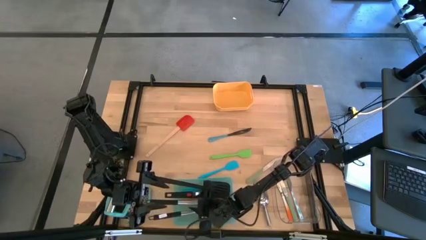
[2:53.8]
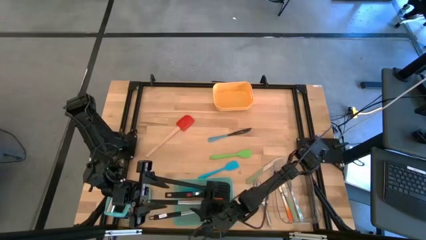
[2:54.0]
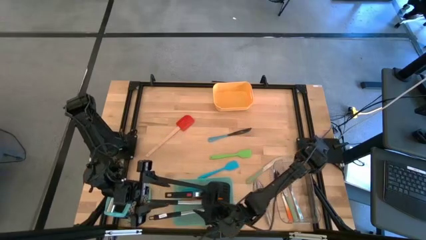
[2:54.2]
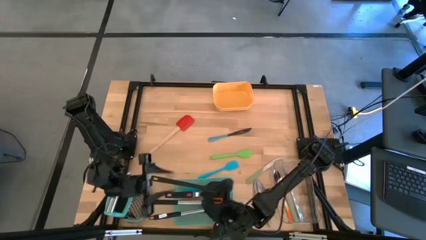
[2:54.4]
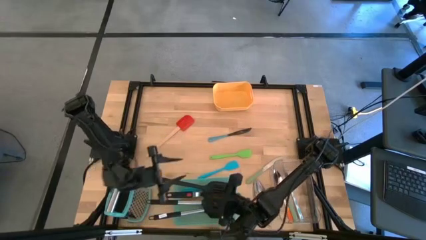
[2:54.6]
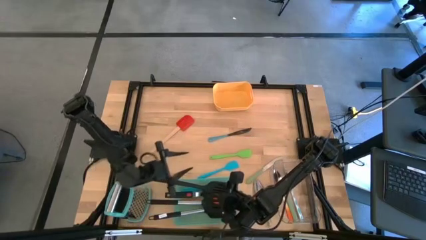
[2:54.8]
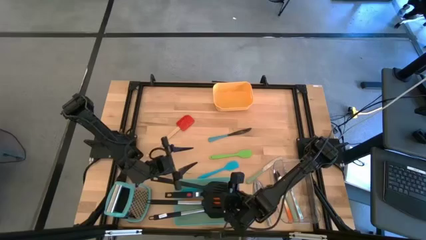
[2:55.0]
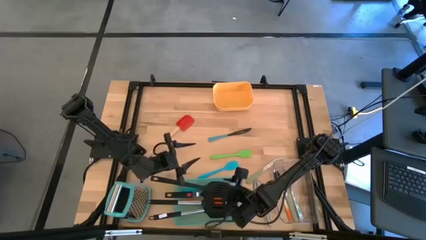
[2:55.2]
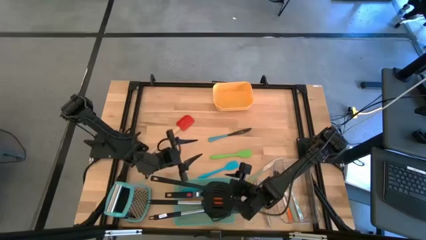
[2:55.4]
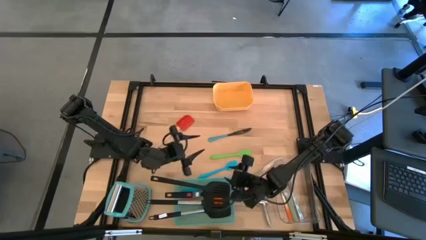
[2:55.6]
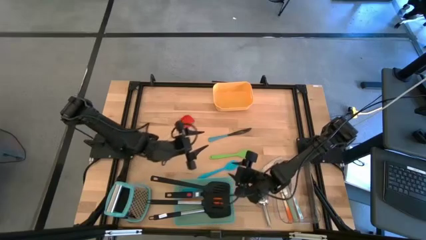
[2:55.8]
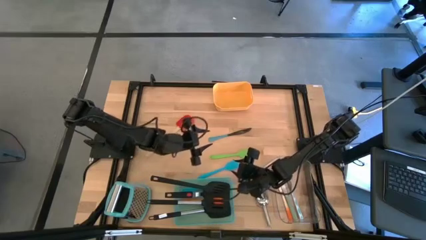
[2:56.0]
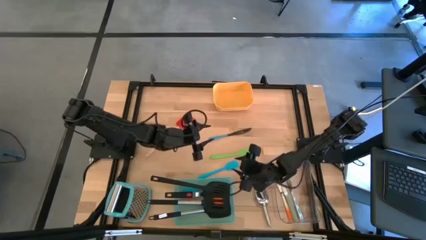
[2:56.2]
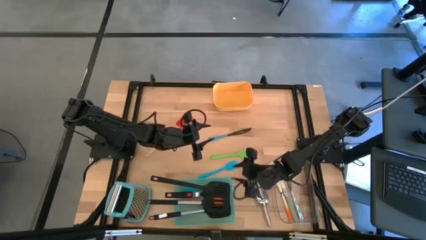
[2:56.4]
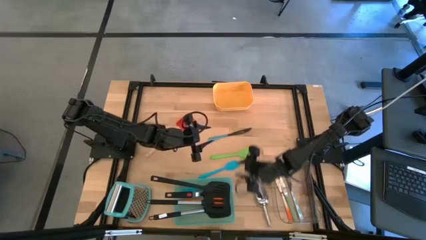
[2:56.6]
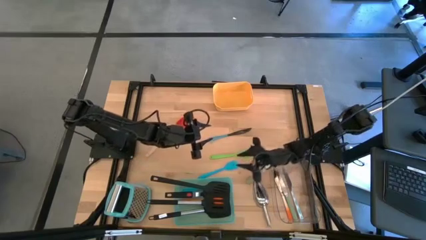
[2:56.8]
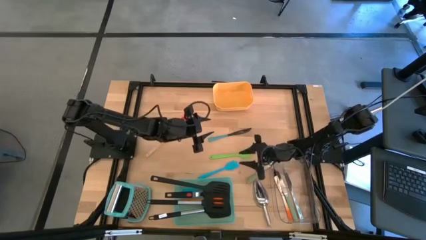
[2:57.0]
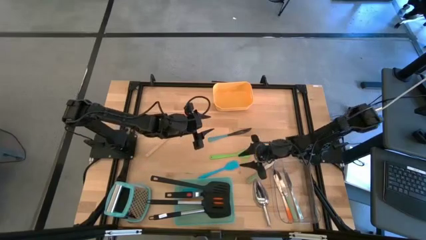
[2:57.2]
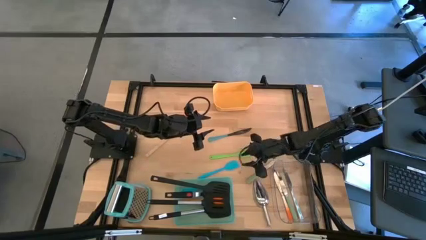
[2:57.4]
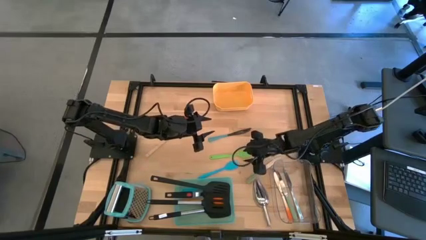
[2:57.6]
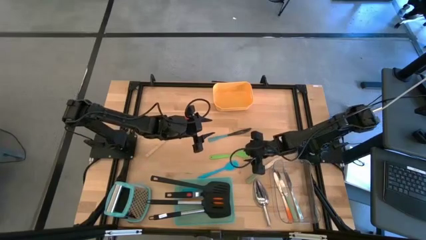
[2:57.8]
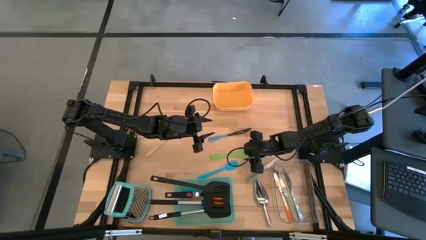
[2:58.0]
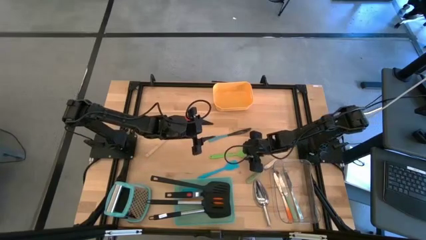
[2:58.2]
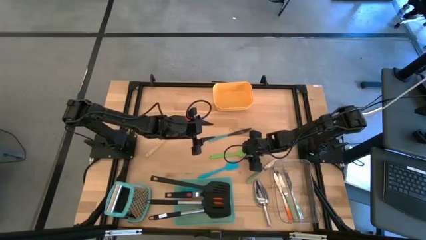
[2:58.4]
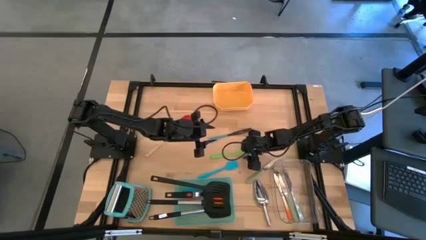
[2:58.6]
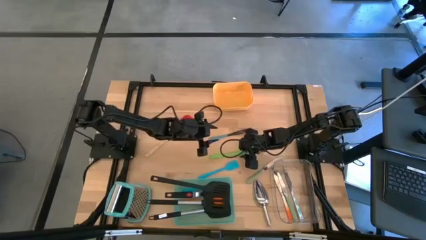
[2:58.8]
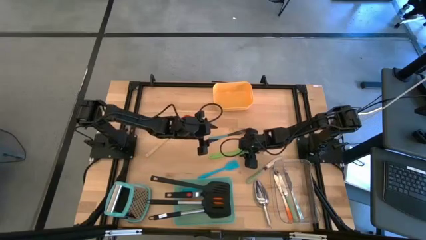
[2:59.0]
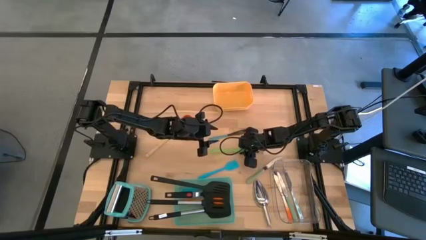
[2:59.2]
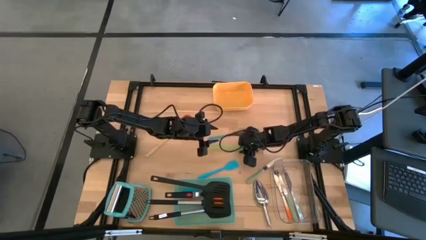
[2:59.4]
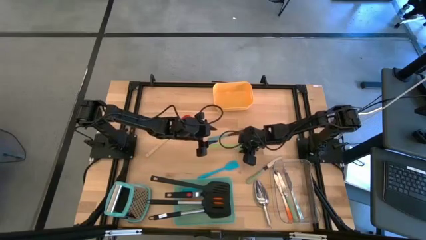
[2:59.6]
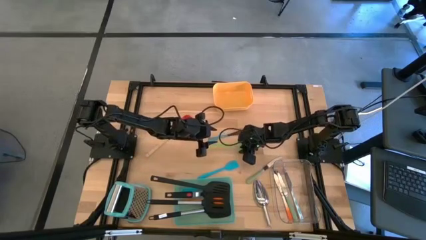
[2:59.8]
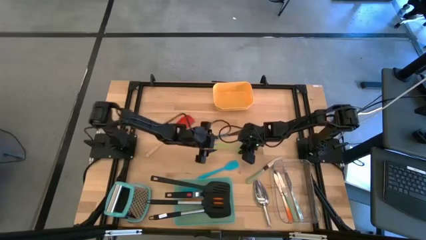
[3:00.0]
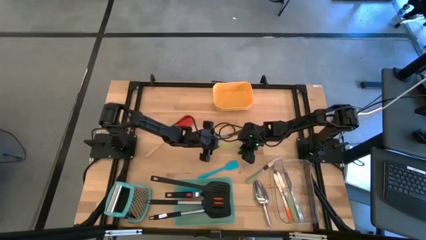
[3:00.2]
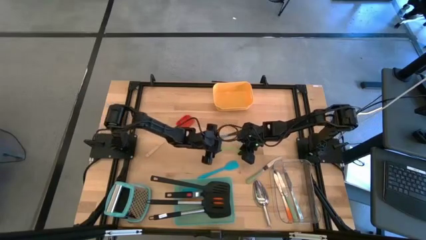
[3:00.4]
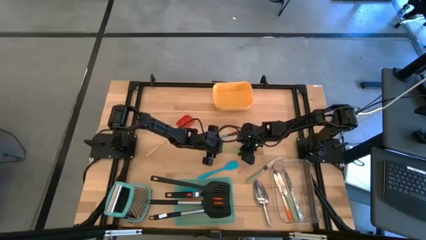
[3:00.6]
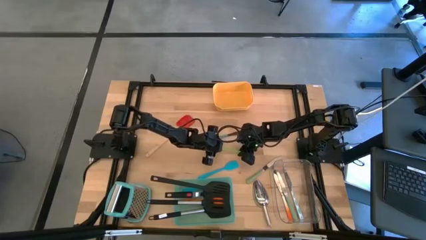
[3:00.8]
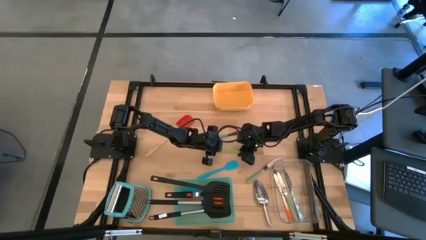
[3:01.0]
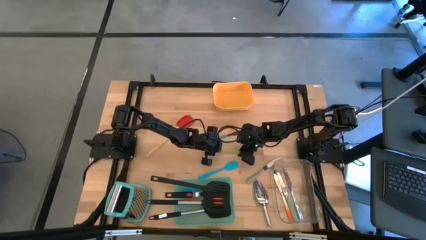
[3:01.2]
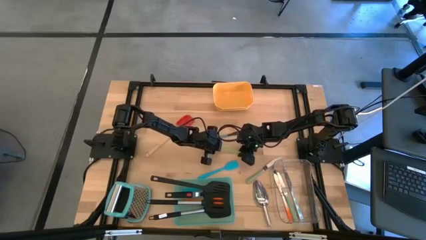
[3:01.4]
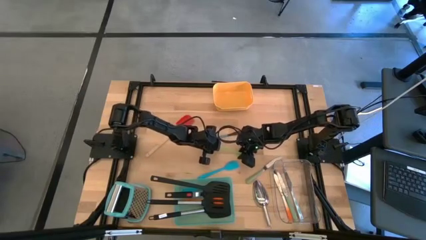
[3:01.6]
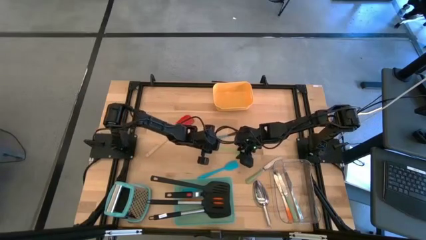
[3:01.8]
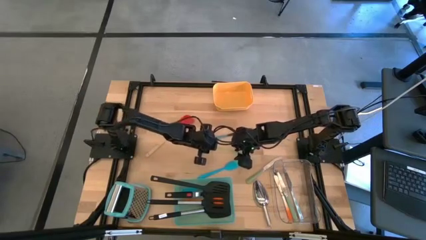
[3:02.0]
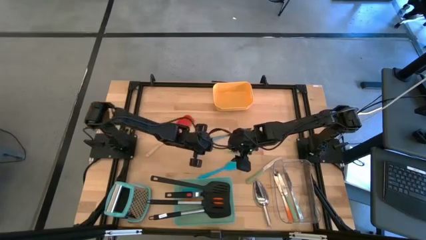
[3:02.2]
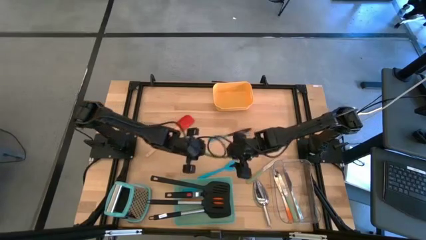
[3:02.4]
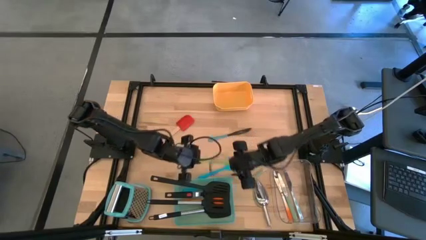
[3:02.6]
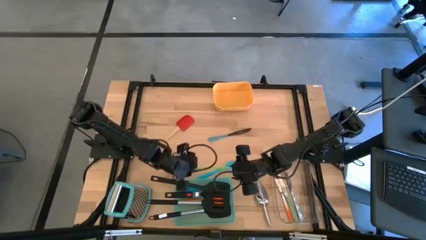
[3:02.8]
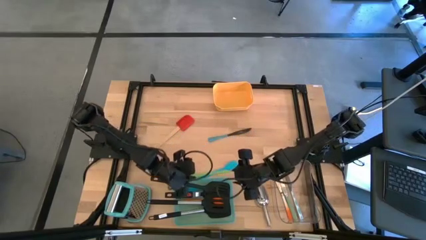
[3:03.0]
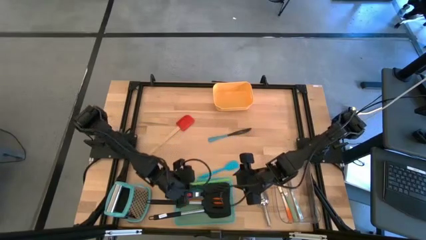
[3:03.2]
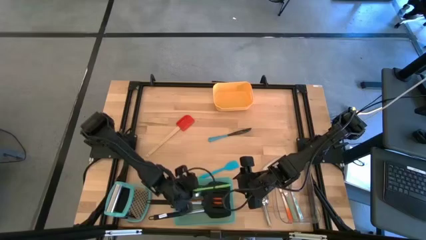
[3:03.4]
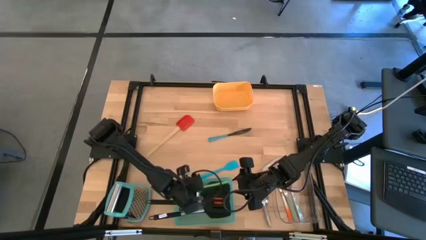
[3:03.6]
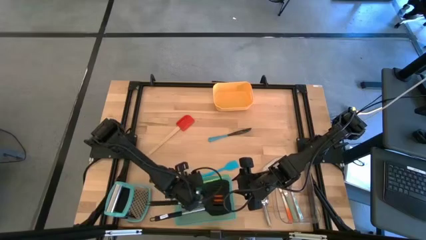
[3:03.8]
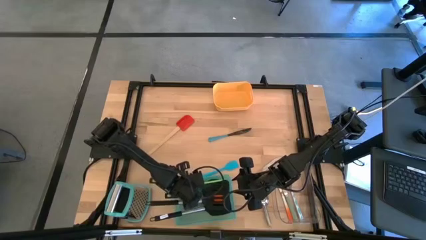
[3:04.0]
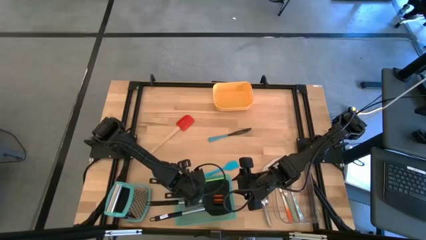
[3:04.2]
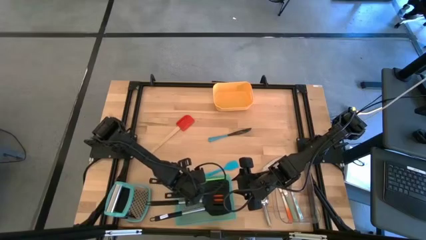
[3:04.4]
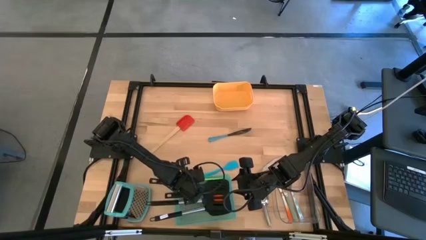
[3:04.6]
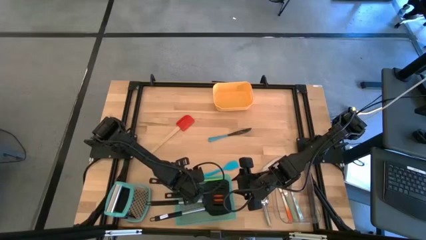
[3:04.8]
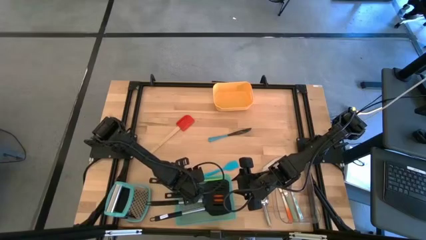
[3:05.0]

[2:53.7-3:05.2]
Task: Pick & Place Kitchen Items
Put the green spatula into the blue bin

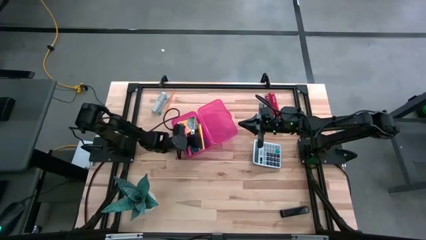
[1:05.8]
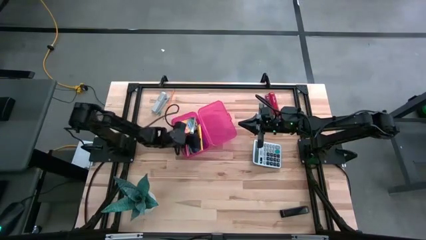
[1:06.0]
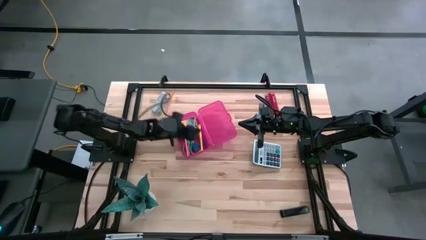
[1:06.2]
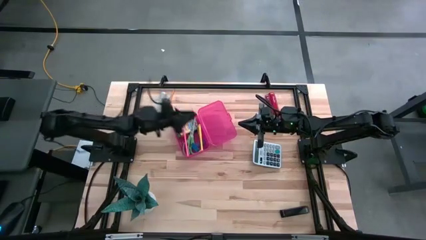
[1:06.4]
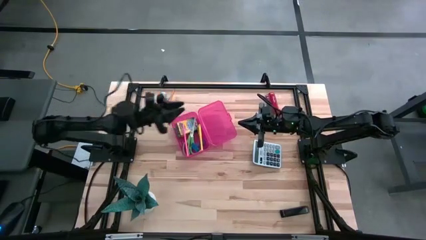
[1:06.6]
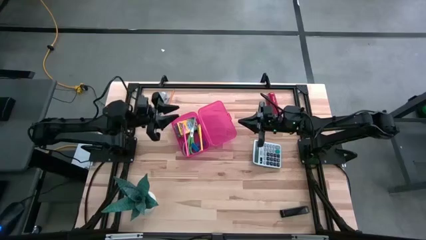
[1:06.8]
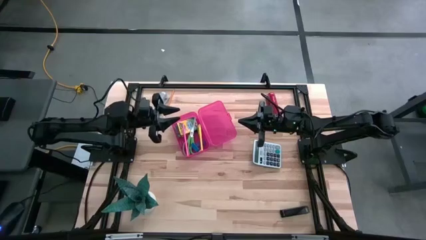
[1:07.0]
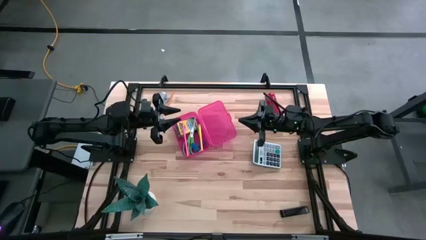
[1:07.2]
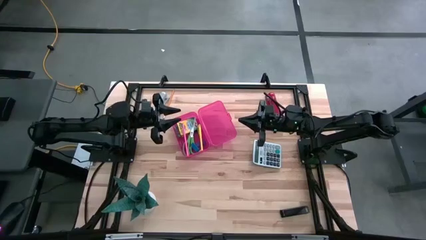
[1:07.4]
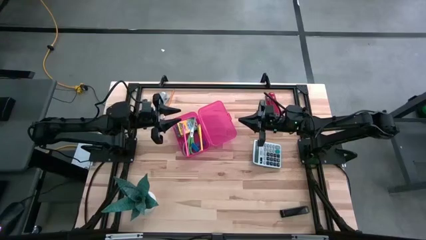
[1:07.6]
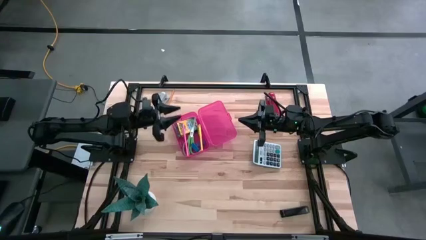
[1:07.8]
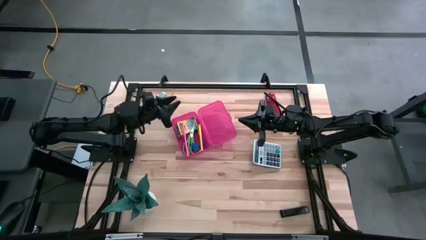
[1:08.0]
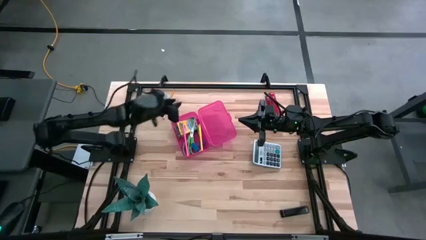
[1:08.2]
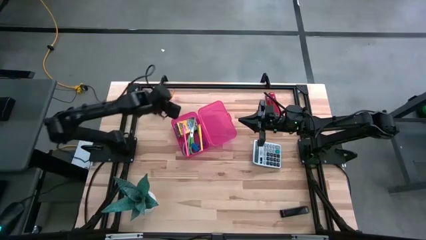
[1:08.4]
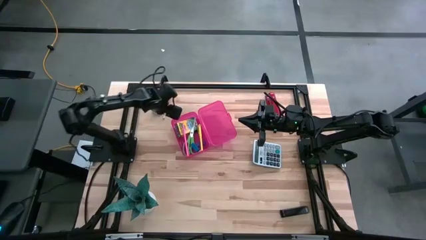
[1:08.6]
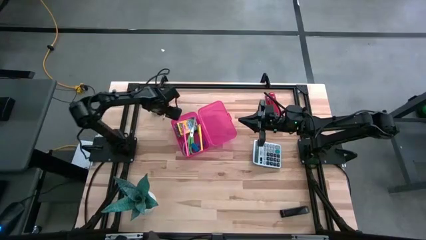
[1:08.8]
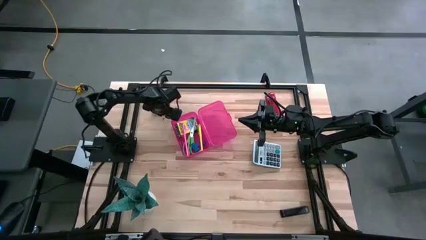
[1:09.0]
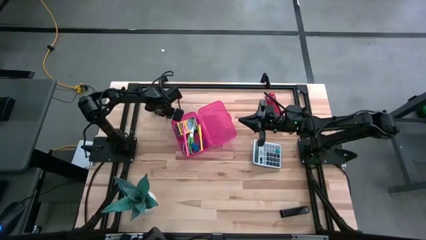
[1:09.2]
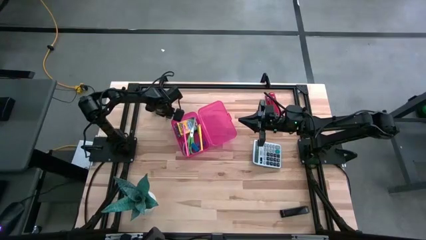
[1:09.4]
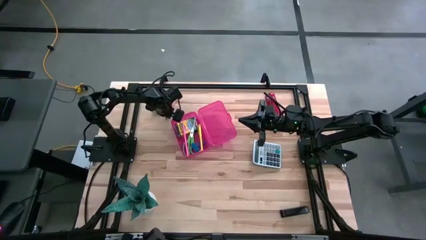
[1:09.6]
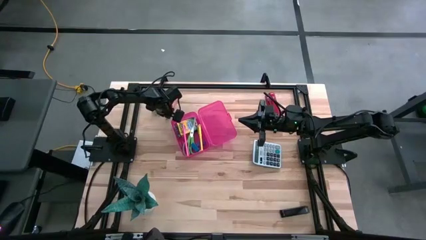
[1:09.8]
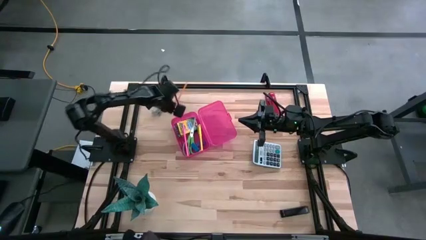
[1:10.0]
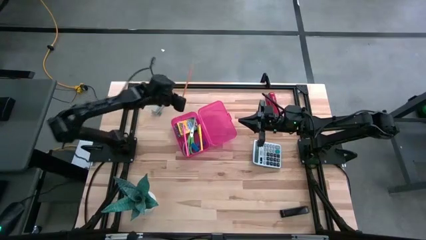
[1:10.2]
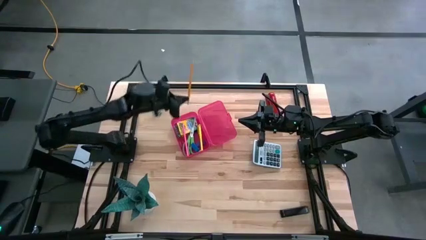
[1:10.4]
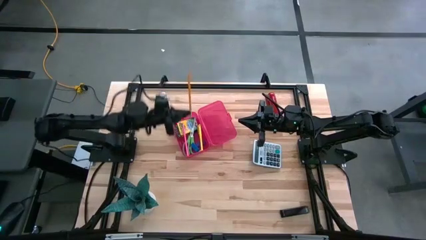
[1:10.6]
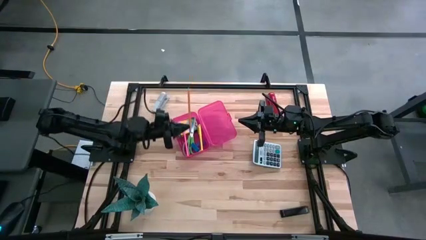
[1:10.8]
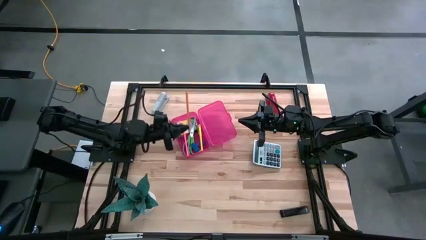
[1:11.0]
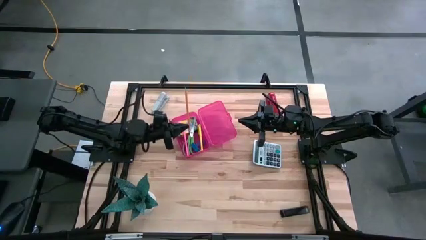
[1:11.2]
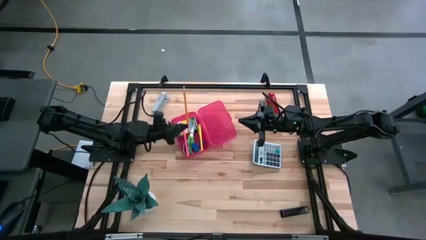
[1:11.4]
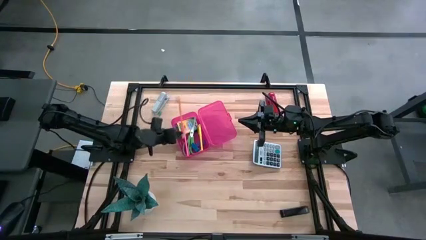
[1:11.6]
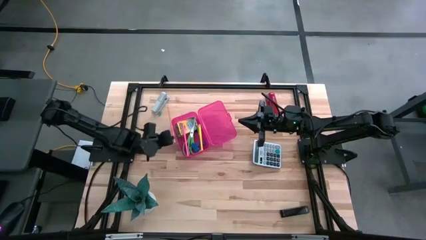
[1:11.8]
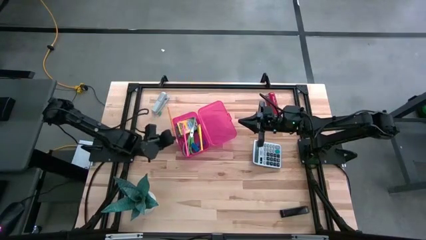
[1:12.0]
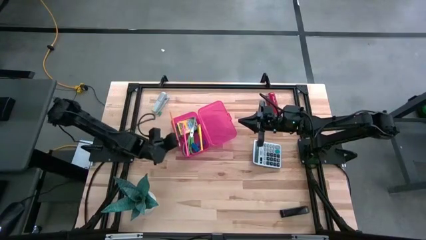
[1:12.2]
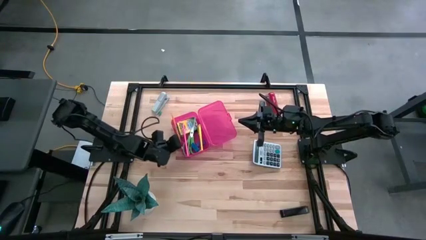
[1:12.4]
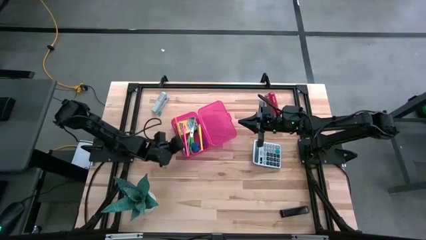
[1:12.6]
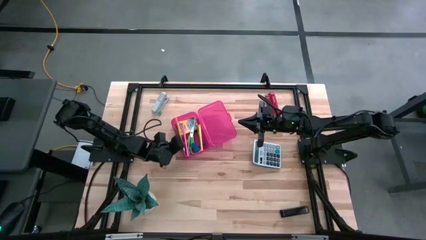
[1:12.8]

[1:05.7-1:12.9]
Task: Pack school essentials
Put the orange pencil into the pink pencil box
